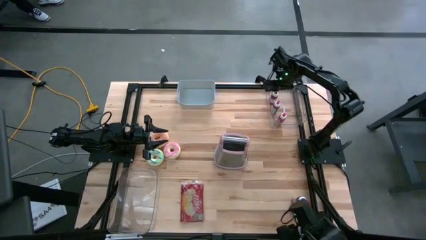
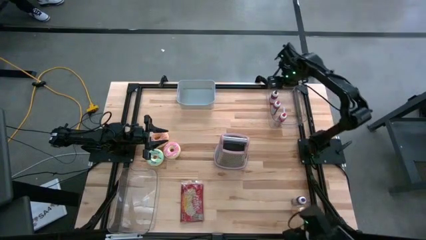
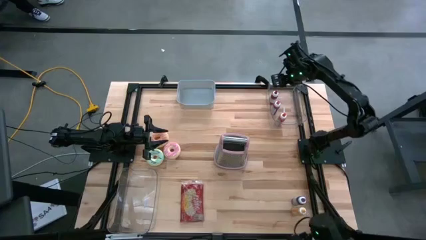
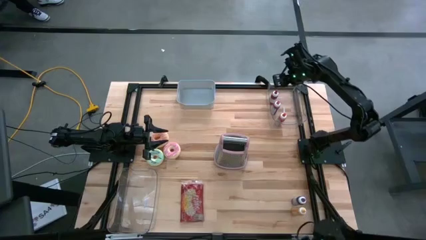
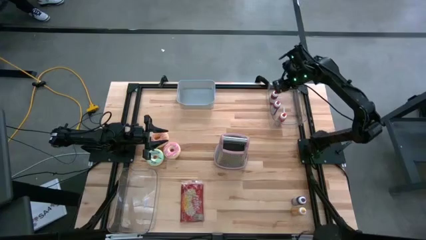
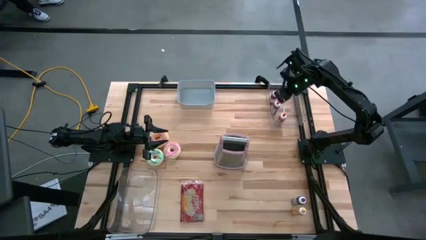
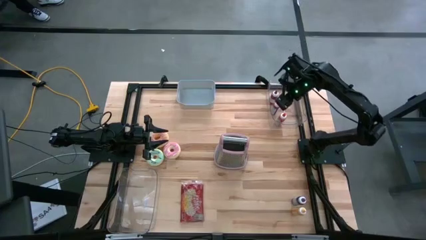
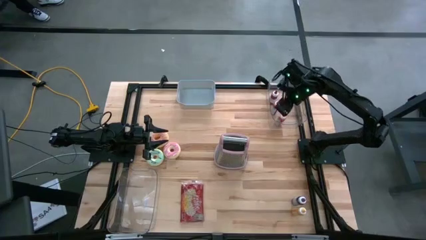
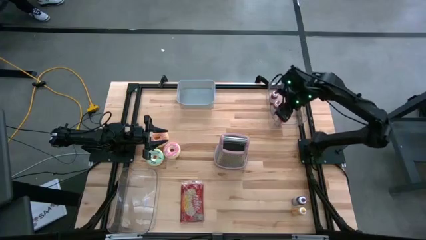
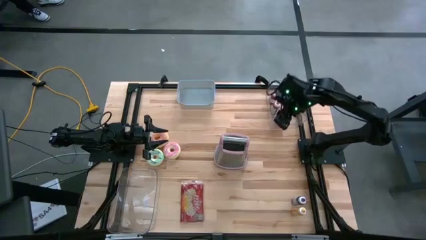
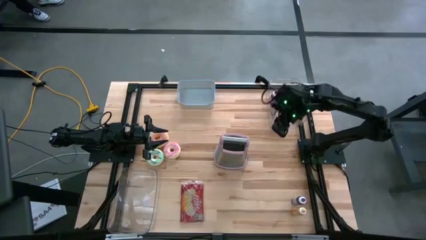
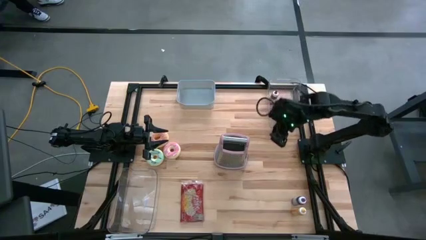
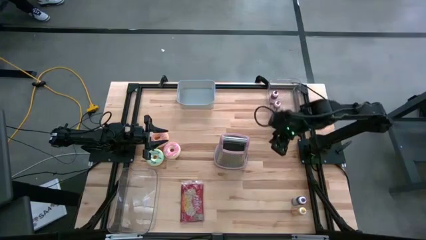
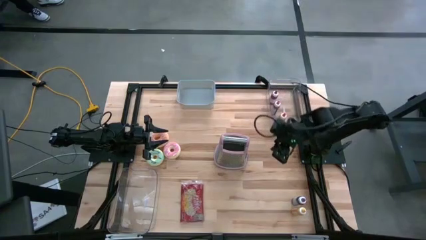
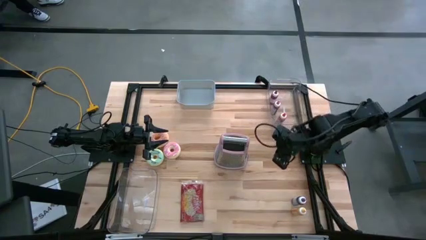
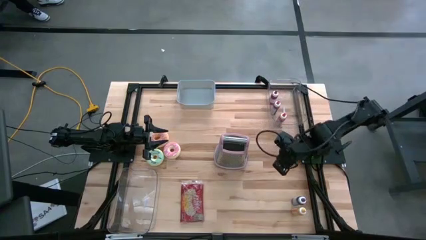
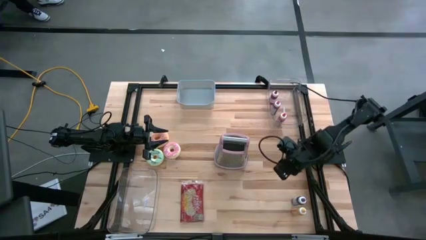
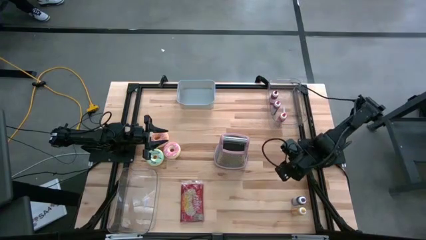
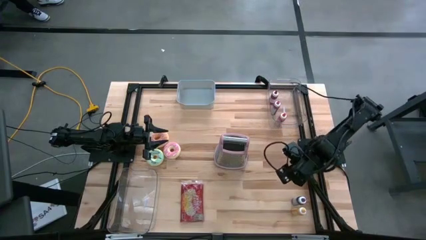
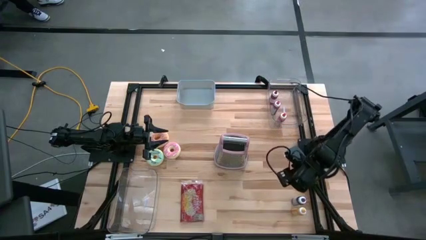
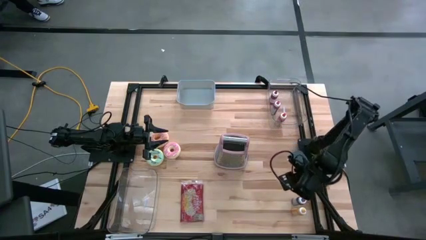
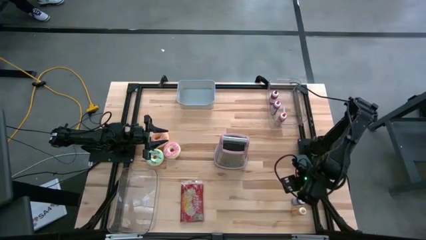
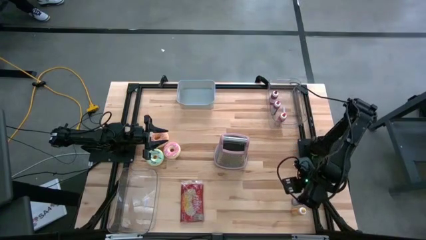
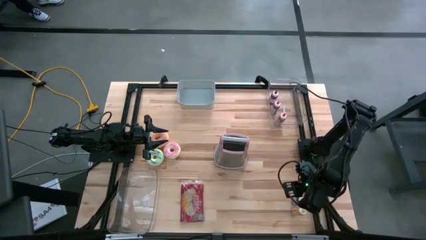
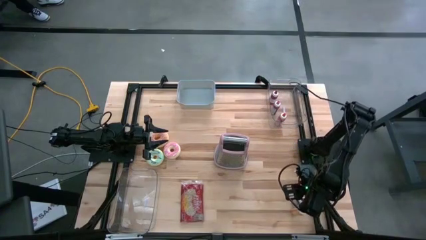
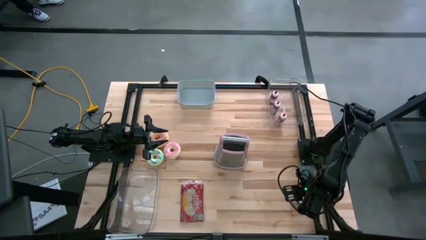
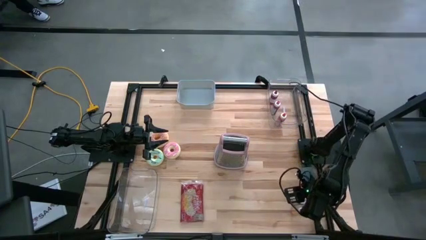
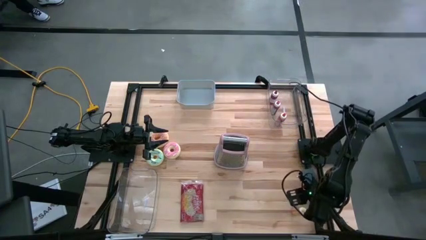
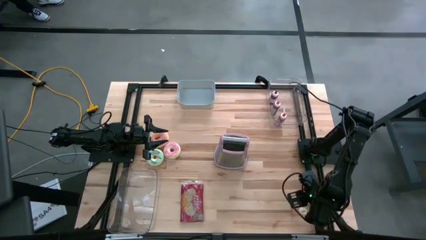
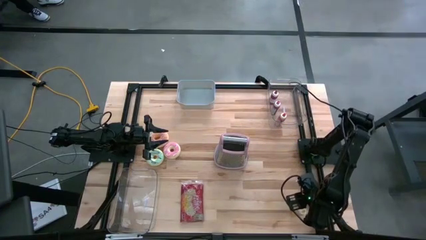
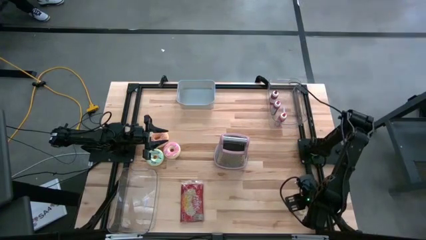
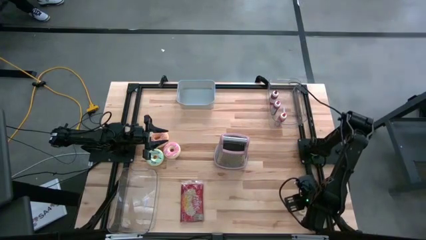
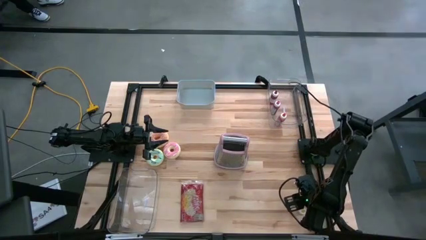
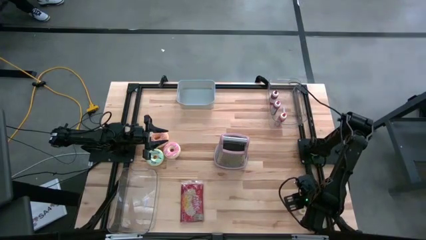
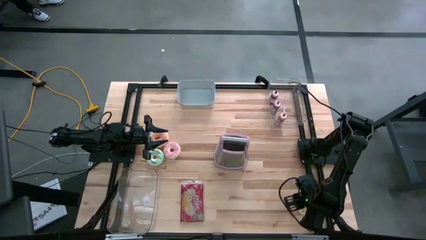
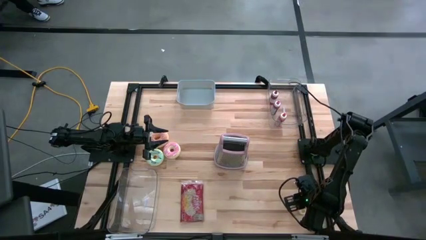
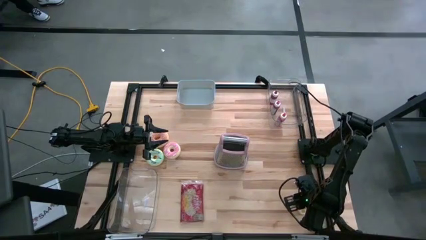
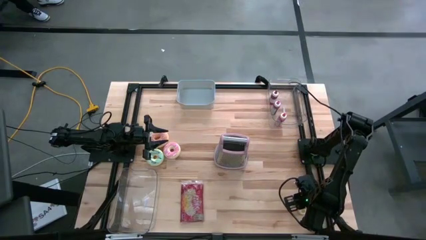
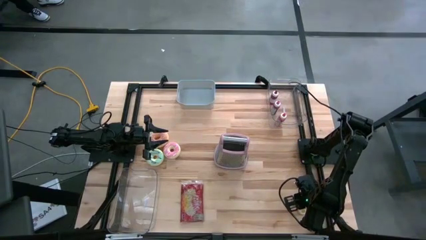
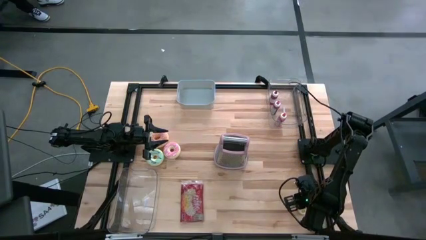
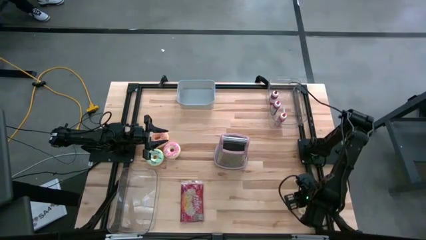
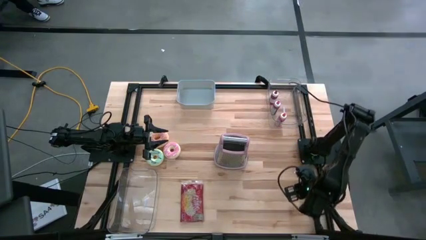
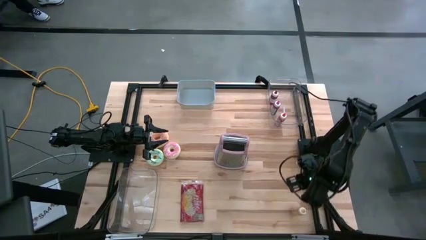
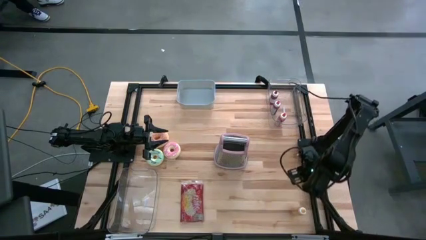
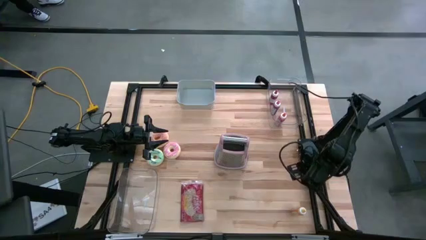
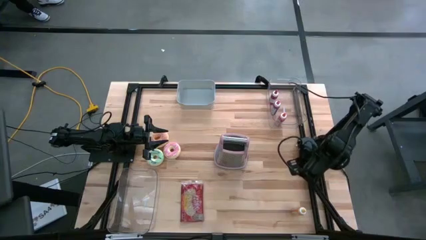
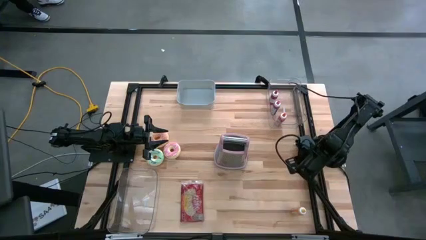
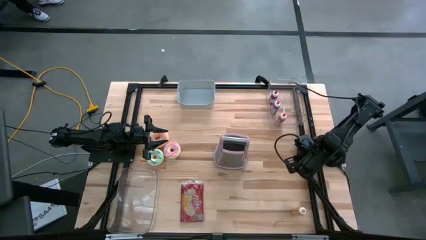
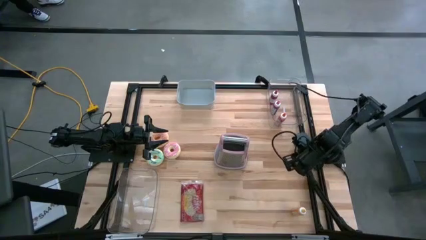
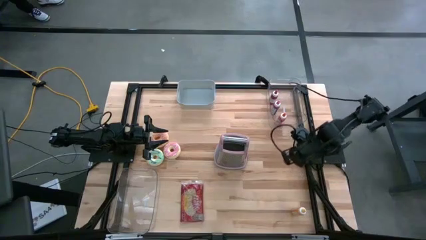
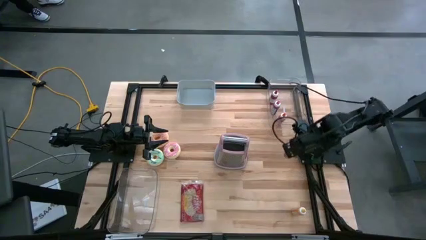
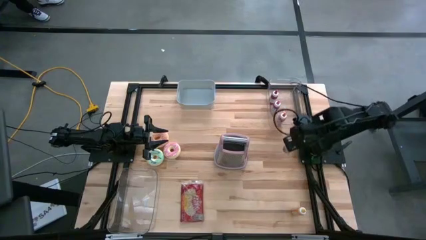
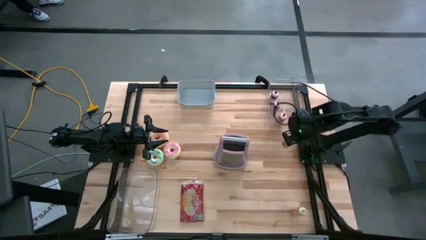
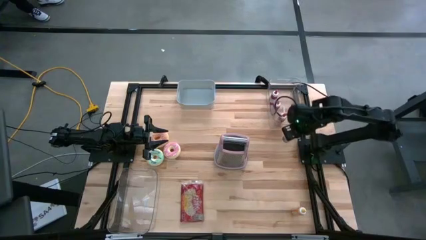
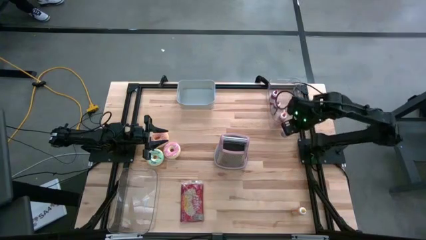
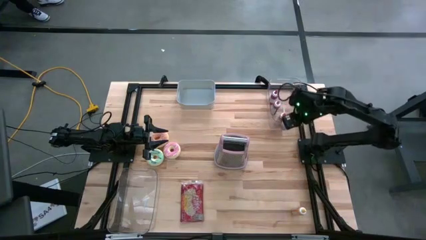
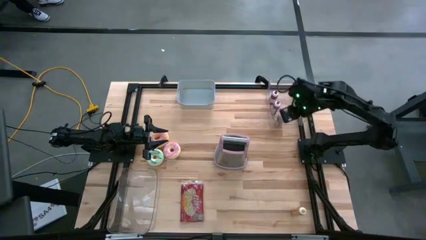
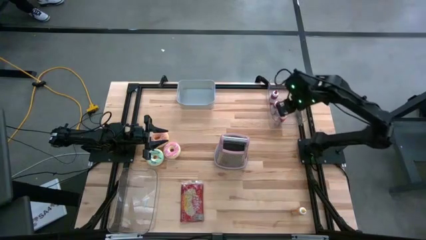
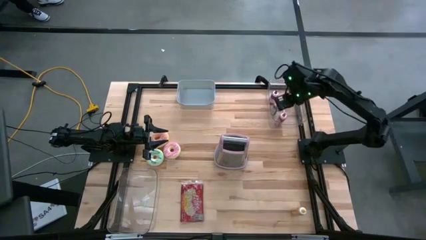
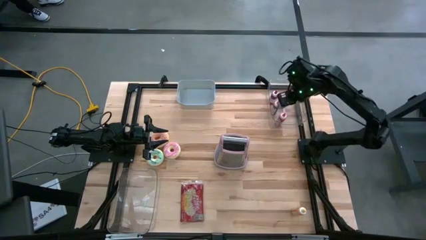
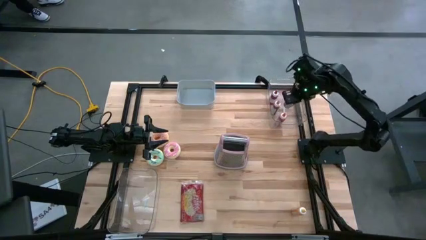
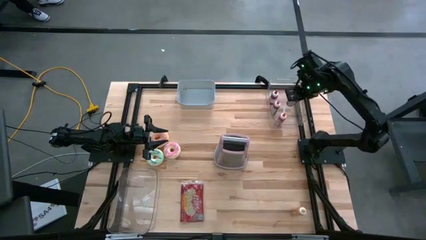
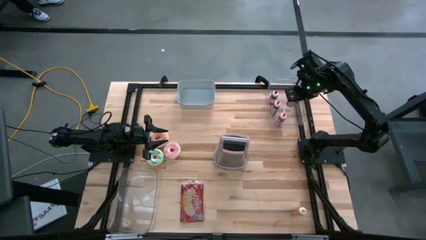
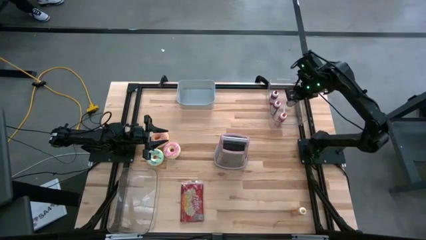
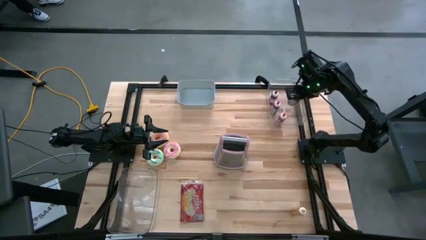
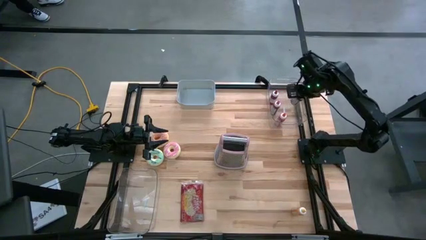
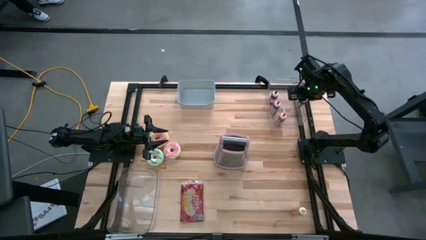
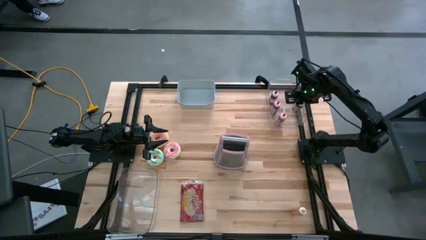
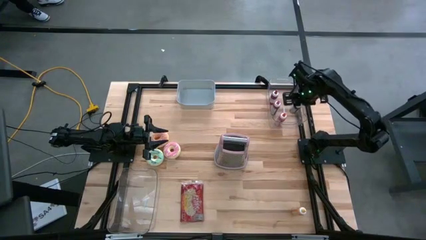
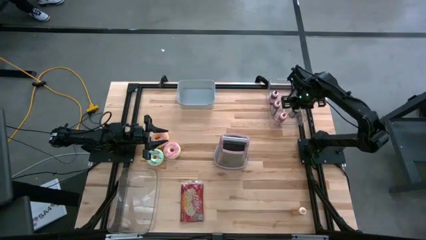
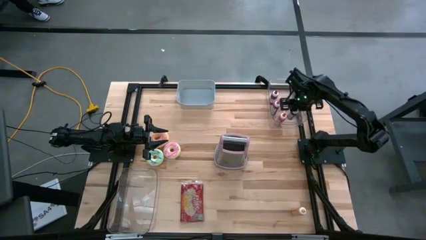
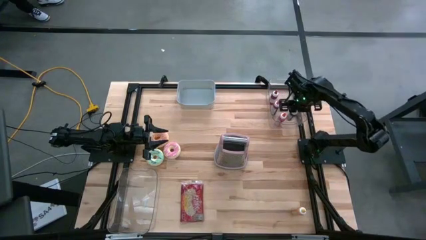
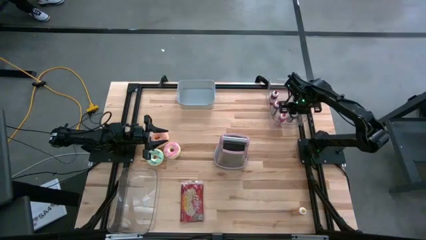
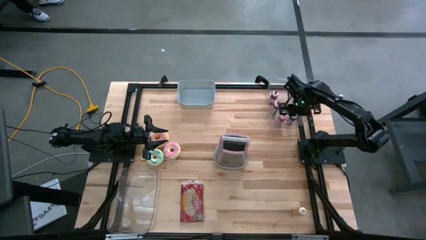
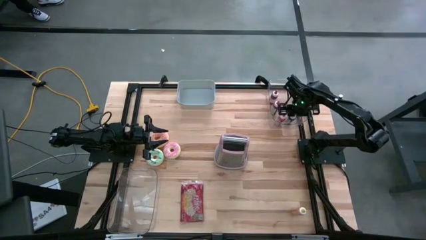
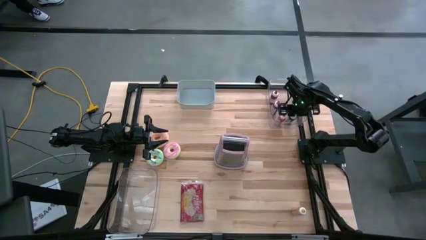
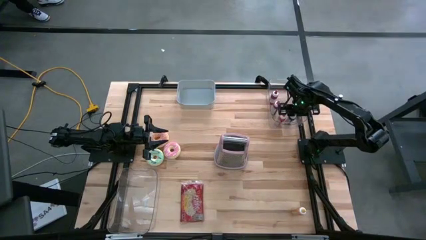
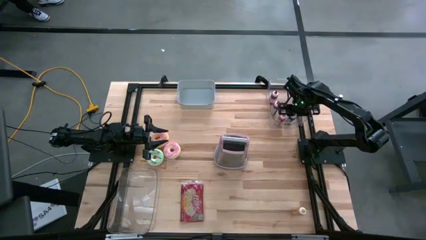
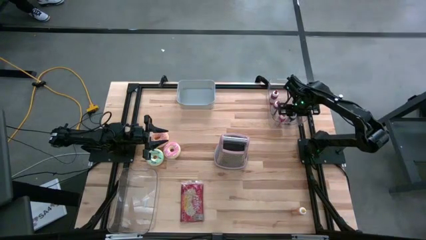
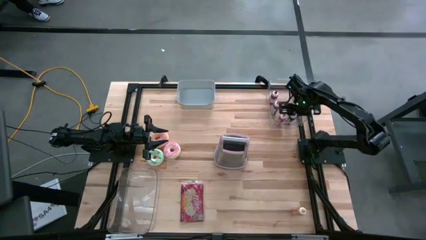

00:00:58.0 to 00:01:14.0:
Put the violet food coloring into the right transparent bin
